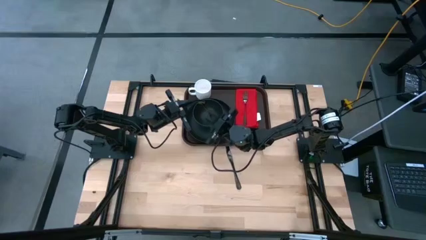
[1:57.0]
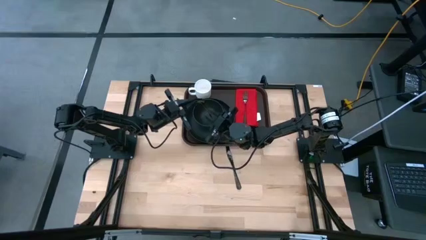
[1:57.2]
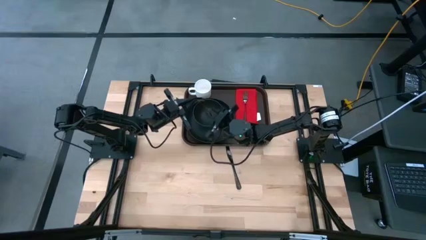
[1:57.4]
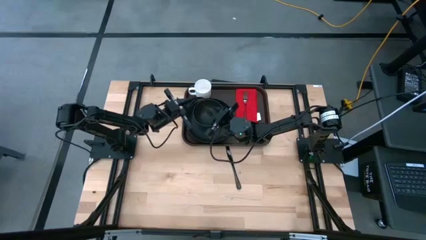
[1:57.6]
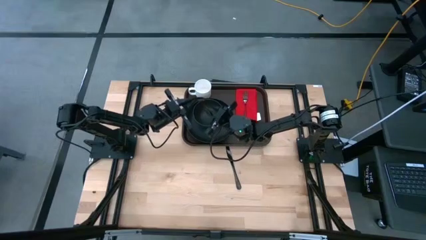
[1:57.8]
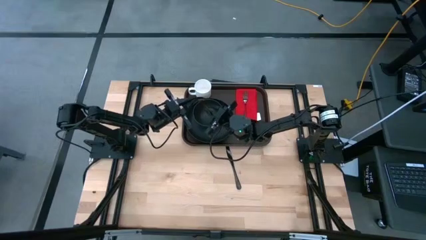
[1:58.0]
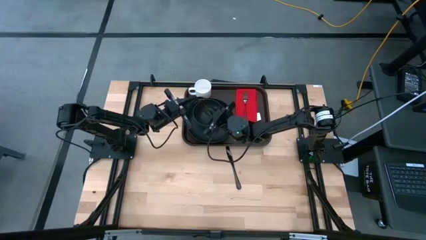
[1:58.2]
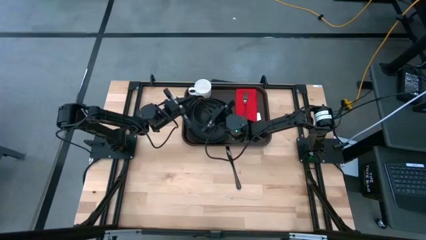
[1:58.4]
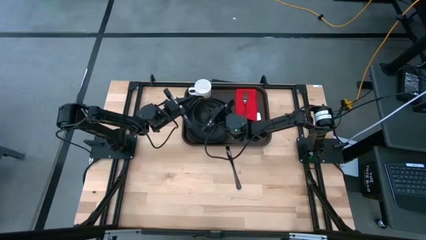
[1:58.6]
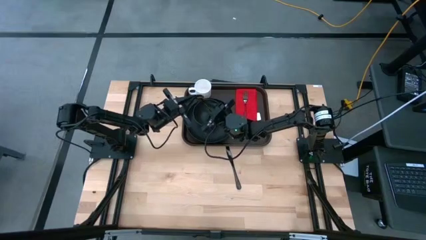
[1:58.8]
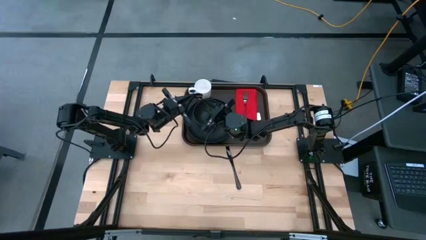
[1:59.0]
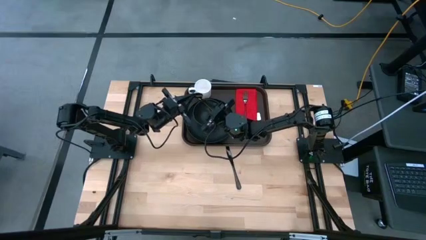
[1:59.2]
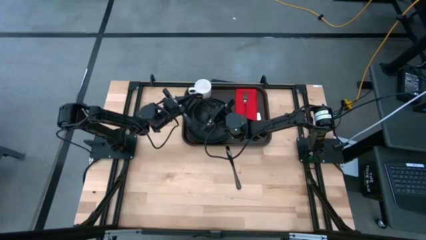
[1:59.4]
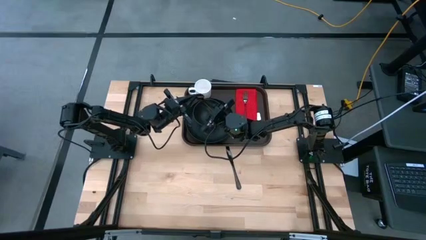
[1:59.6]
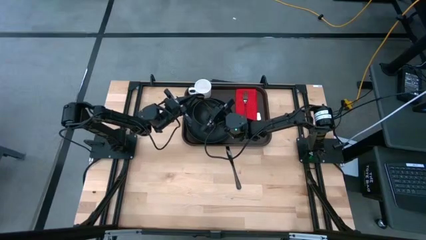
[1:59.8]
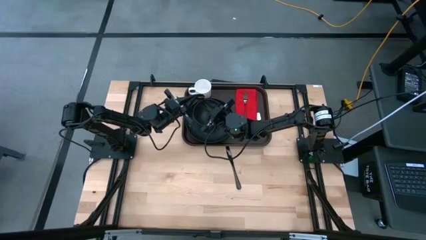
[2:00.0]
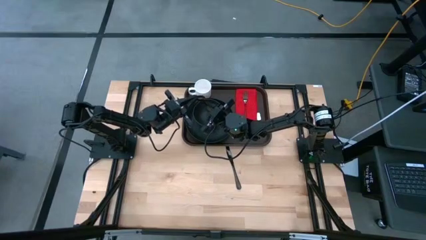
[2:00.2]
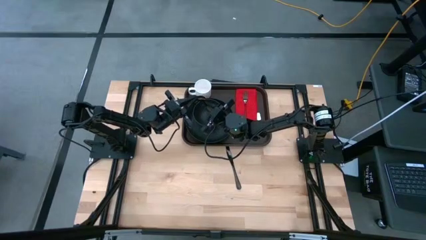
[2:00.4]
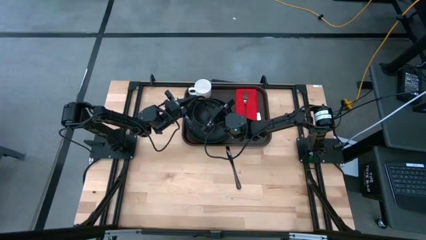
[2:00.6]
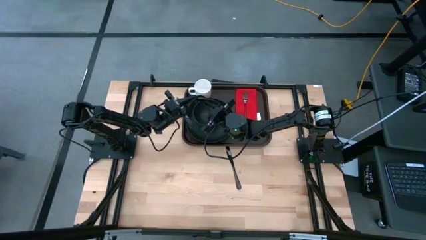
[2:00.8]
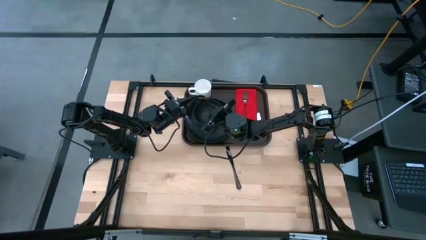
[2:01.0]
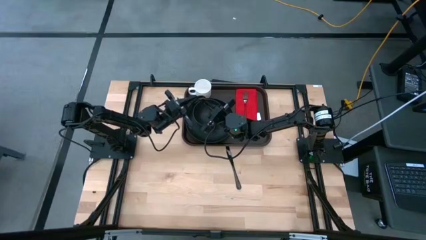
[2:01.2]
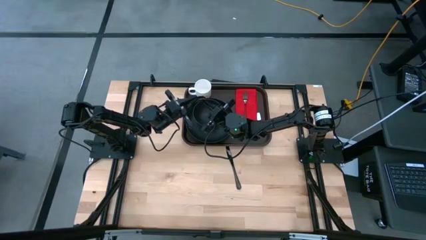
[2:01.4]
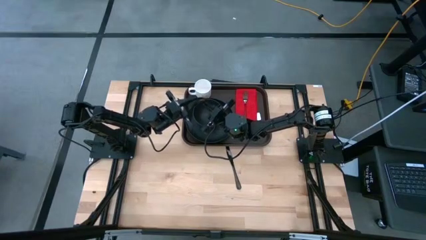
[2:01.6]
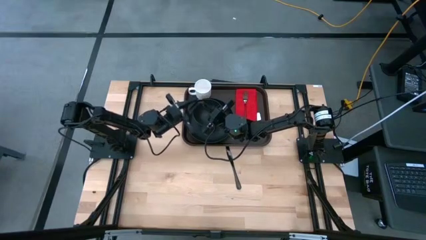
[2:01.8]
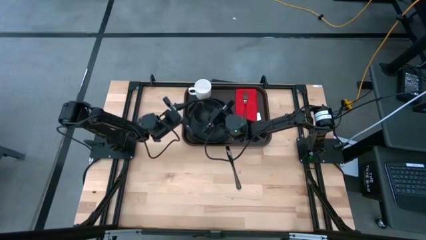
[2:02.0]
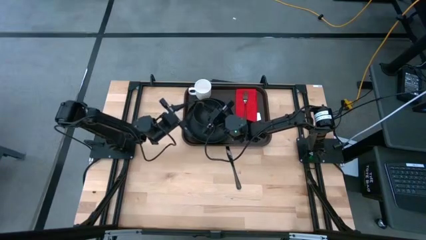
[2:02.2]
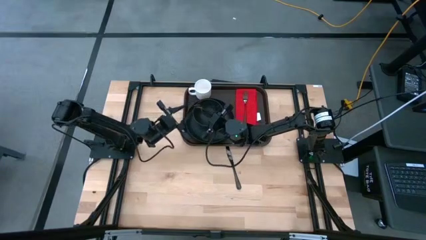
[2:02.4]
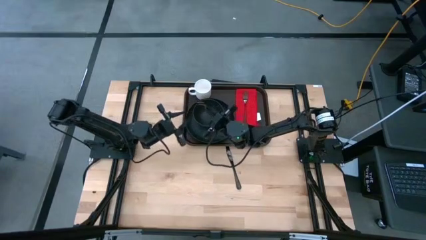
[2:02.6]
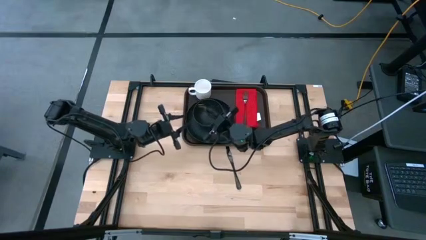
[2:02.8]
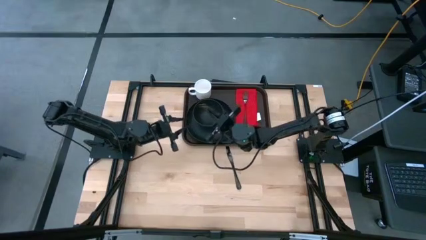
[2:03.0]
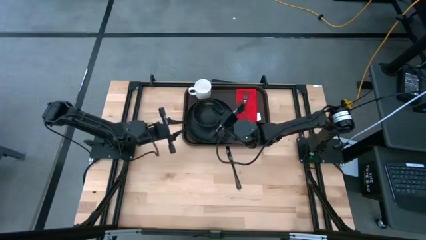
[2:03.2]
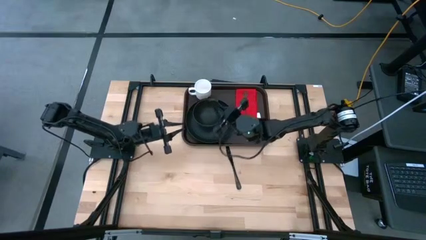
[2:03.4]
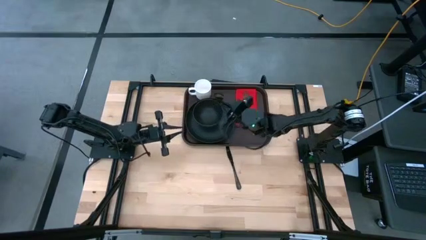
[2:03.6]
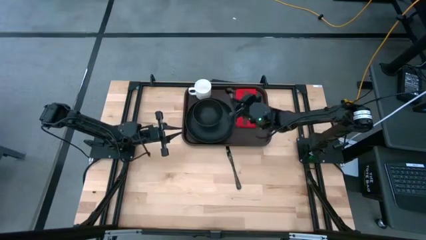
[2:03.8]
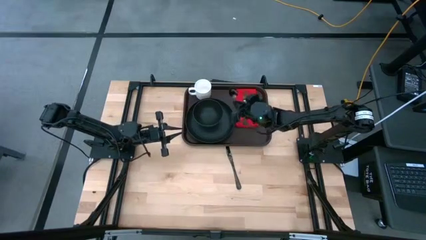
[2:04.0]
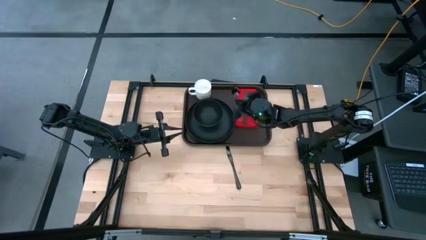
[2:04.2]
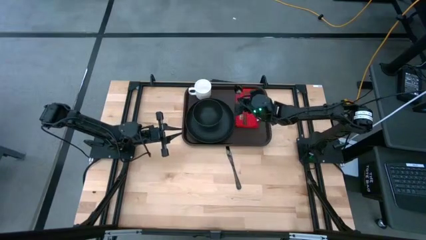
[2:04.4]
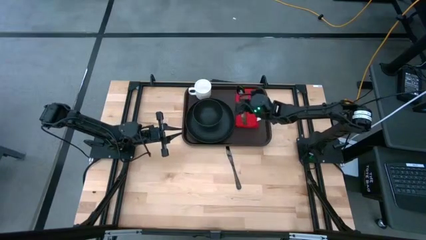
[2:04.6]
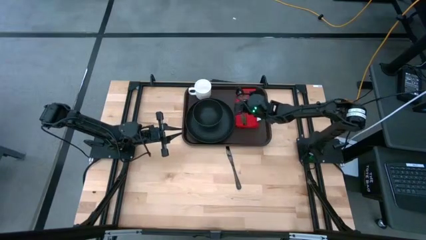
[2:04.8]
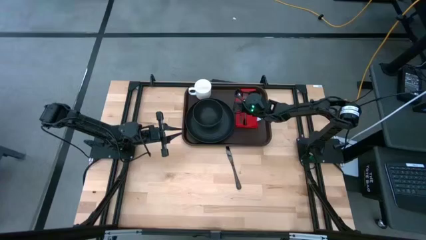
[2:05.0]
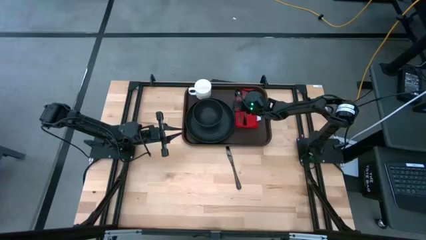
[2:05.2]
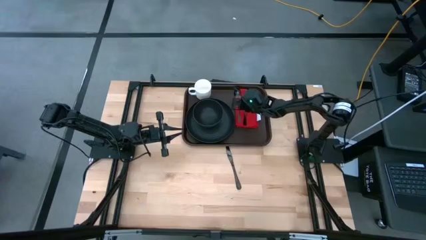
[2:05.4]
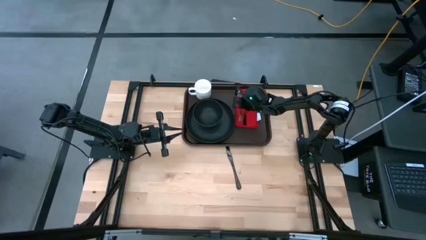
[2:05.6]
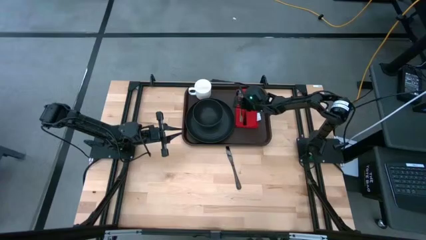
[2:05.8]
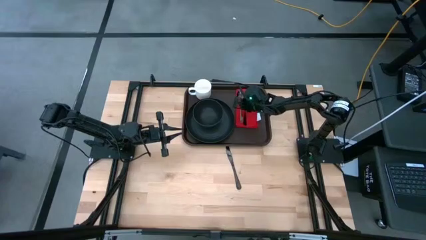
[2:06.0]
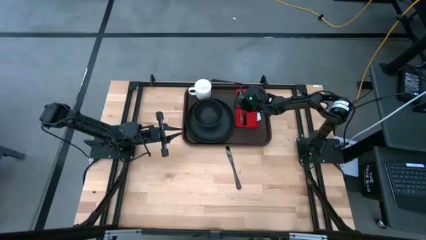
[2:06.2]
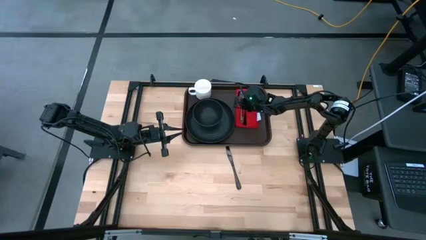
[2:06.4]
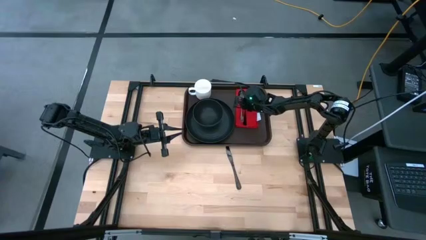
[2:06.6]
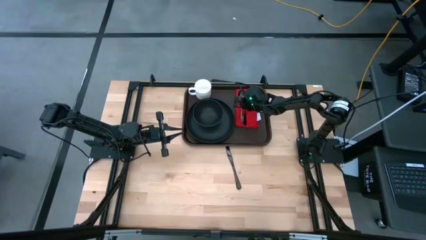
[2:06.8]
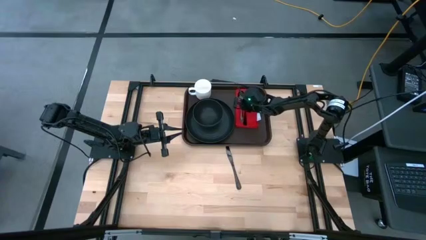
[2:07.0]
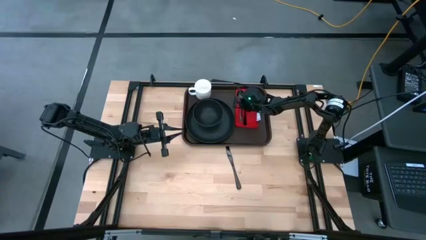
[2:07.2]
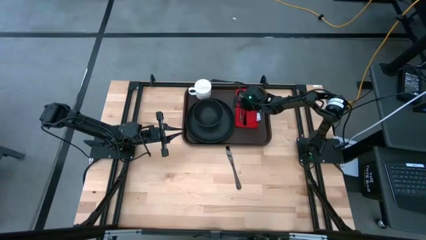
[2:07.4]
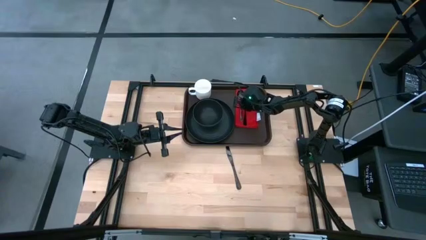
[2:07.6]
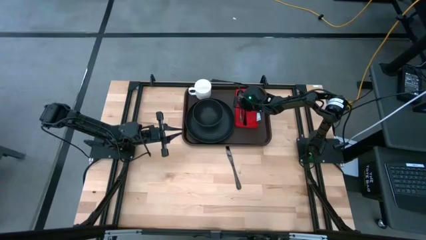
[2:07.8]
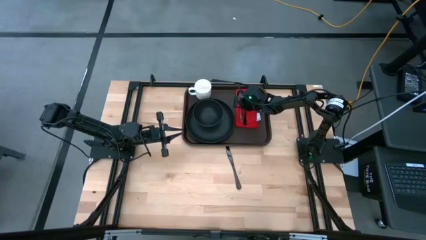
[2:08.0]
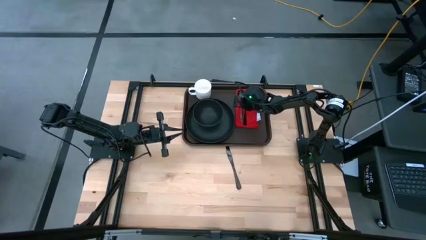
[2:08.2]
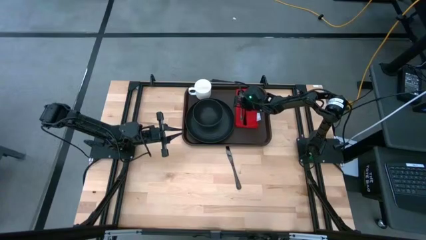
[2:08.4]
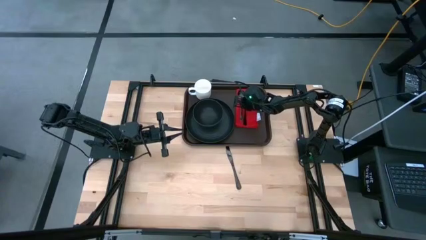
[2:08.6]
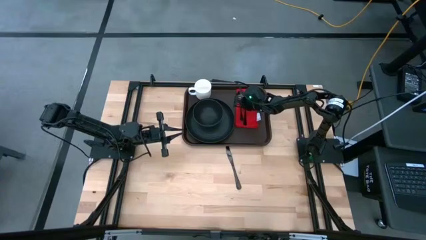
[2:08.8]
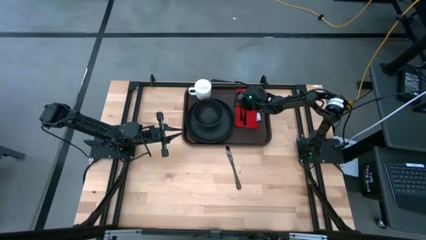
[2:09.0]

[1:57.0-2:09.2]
Task: Set up tray
Put the black spoon on the red table napkin to the left of the black fork
